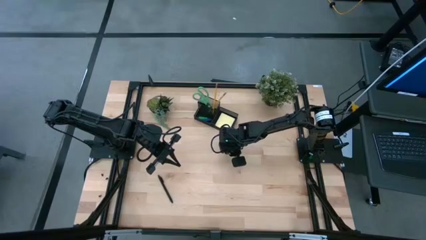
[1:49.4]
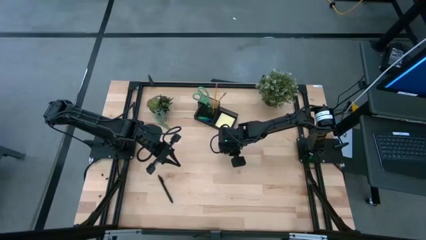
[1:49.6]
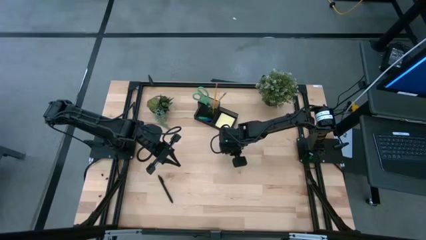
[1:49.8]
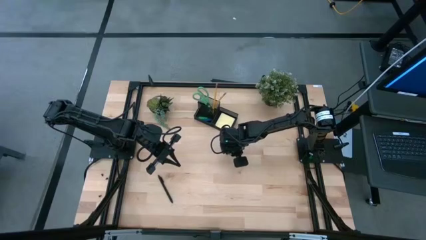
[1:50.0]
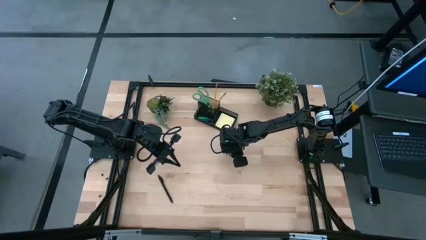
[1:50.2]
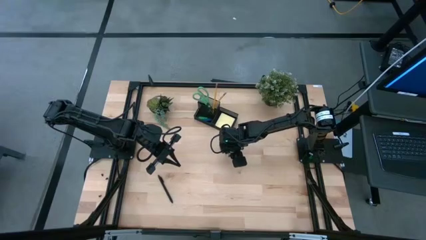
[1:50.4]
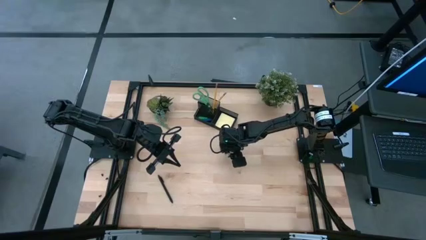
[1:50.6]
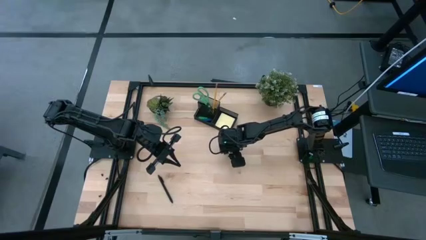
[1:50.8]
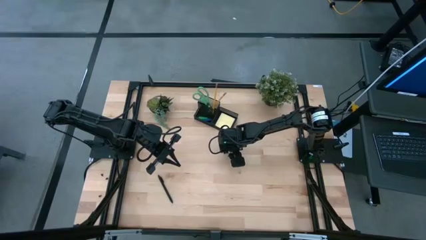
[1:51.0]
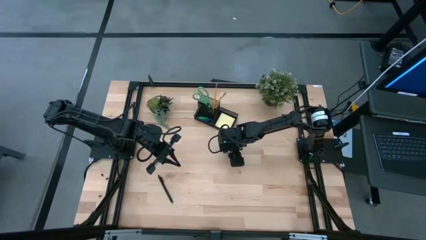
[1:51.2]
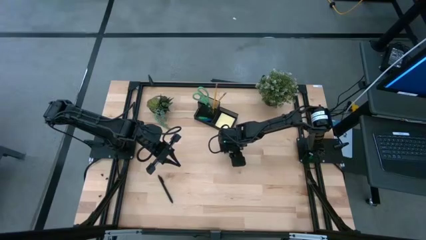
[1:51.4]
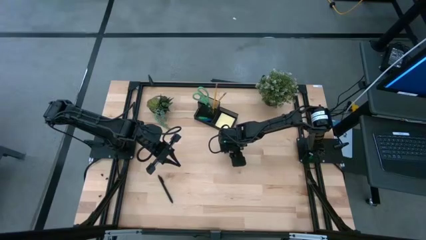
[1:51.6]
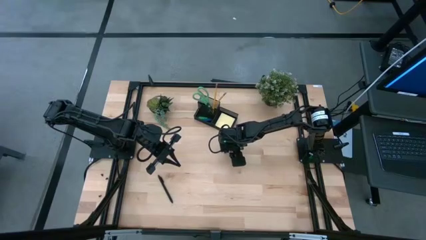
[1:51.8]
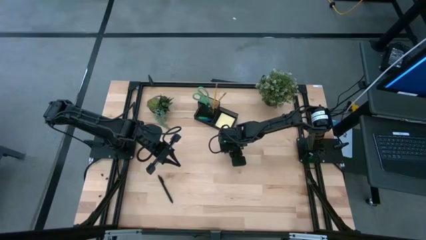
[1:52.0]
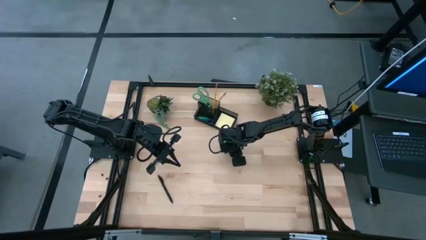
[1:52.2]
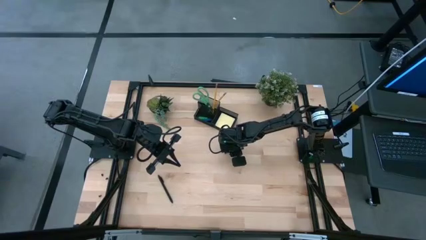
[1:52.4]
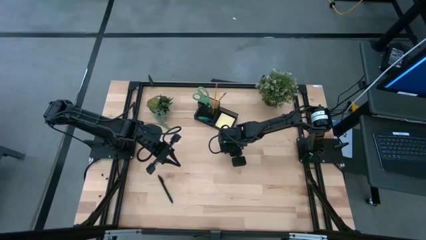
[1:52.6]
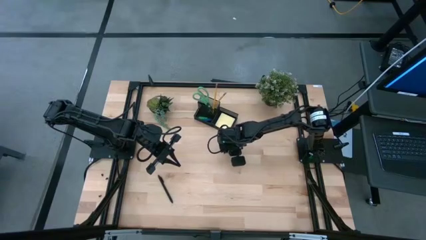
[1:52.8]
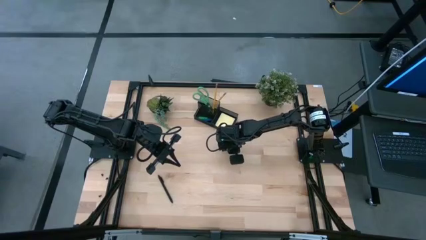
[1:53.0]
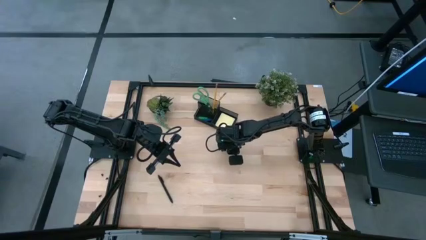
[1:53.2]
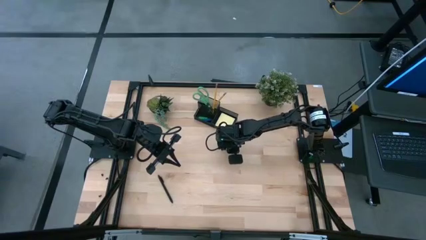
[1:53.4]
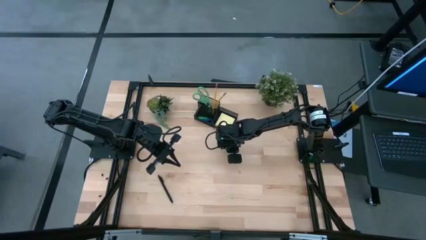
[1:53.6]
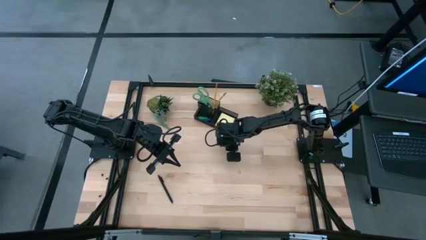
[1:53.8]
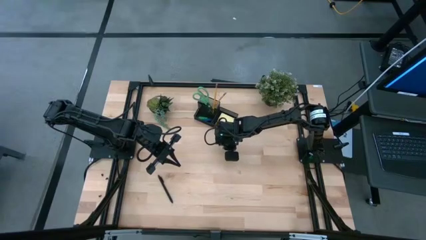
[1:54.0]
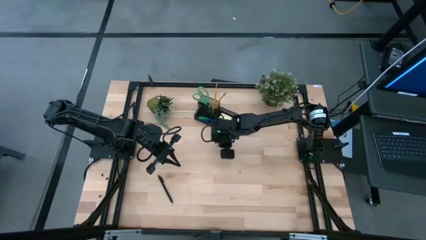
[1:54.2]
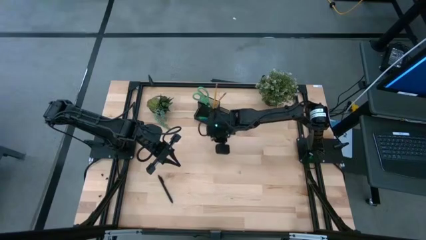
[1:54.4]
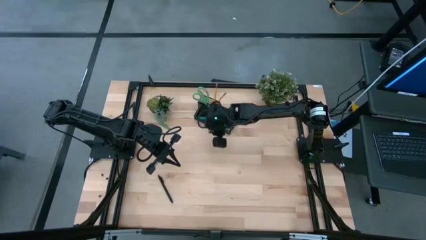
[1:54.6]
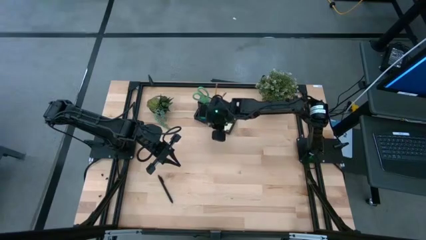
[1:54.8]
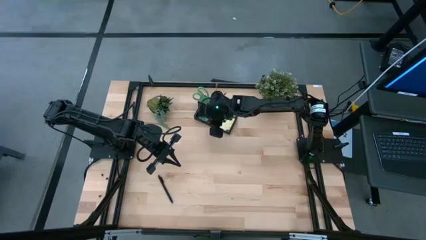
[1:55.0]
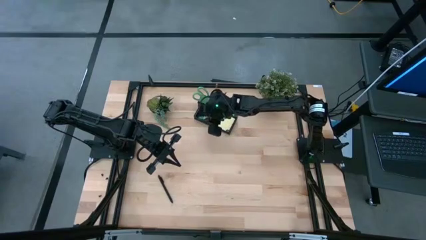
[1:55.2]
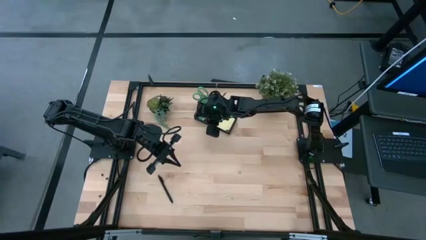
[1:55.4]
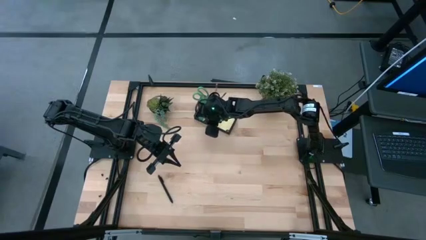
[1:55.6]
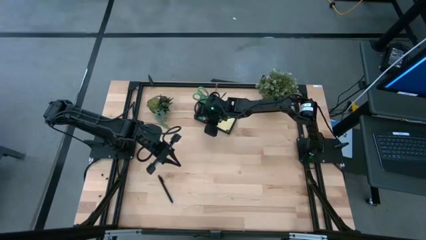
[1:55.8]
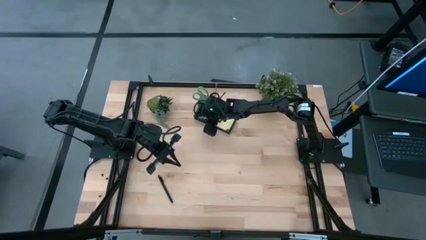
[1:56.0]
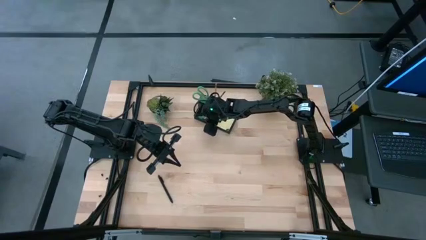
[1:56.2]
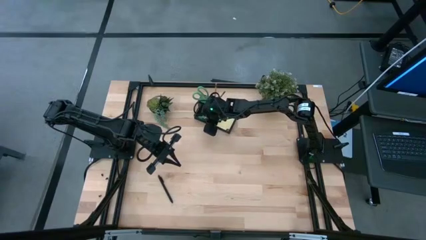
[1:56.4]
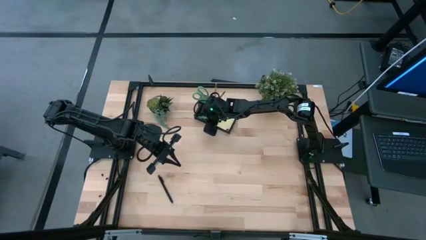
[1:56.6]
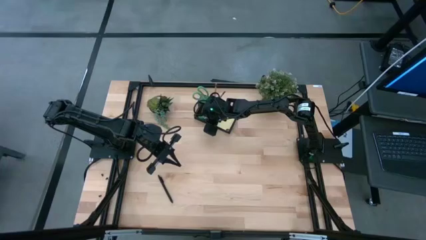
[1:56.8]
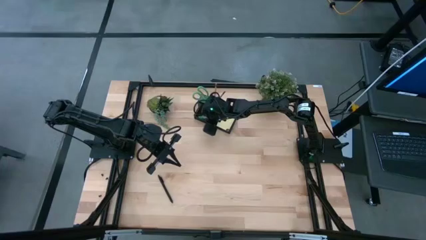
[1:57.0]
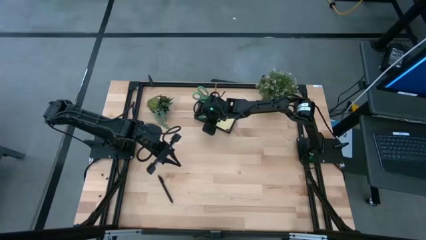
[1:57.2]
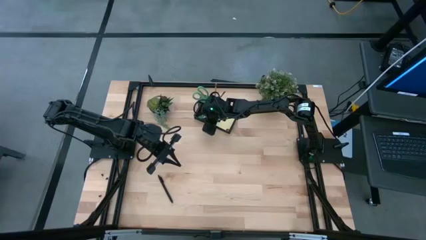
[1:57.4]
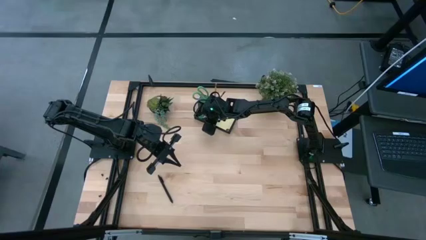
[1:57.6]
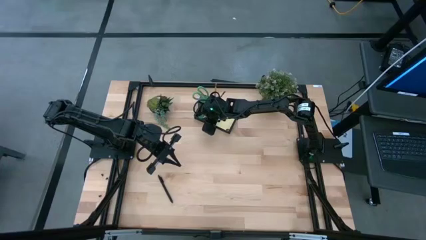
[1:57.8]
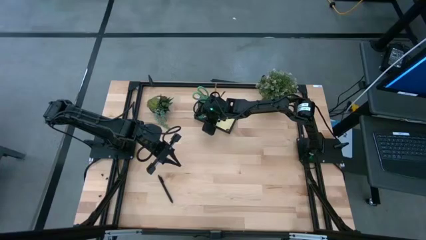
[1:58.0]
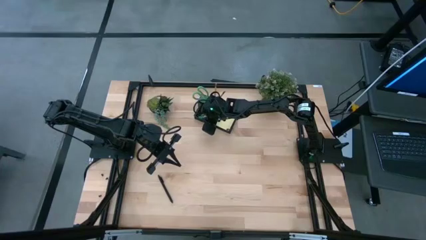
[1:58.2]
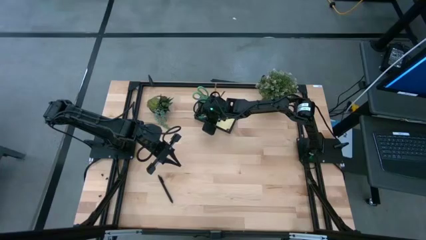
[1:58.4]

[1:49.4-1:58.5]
Task: Pick and place office supplies into organizer
Put the right binder clip into the desk organizer

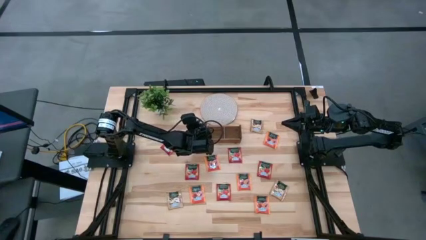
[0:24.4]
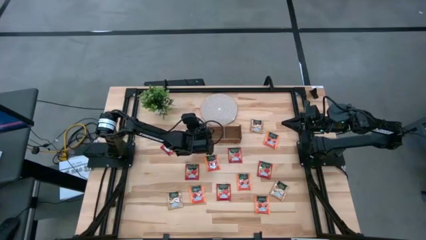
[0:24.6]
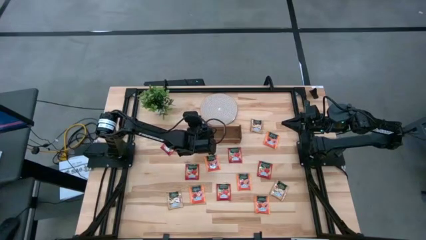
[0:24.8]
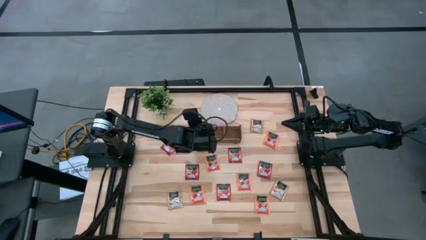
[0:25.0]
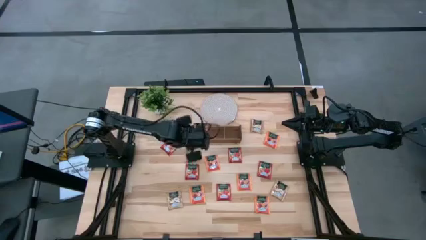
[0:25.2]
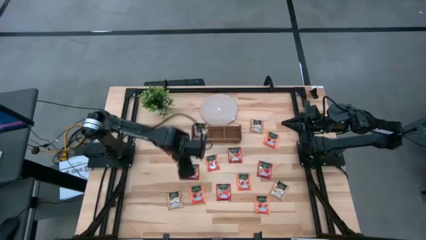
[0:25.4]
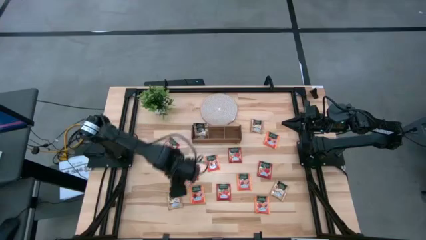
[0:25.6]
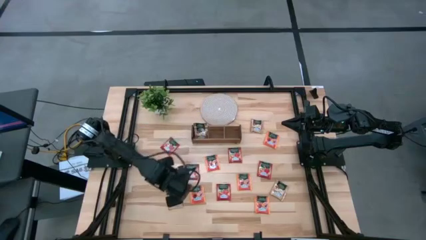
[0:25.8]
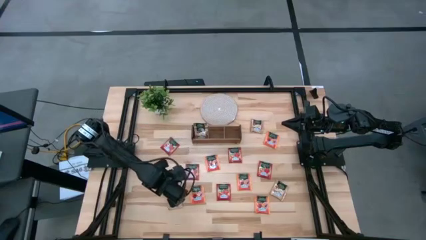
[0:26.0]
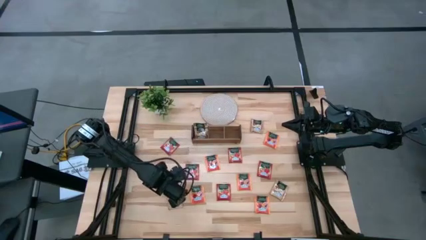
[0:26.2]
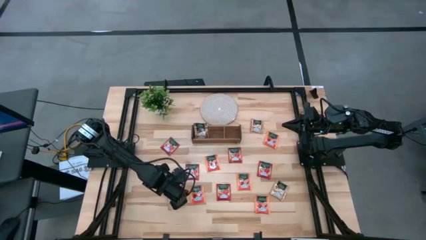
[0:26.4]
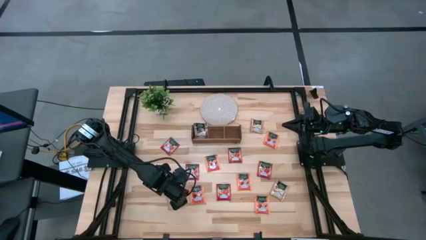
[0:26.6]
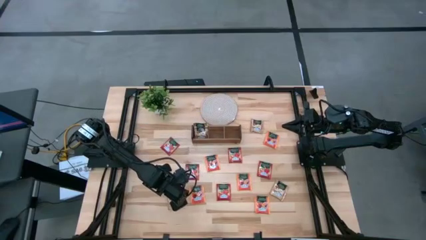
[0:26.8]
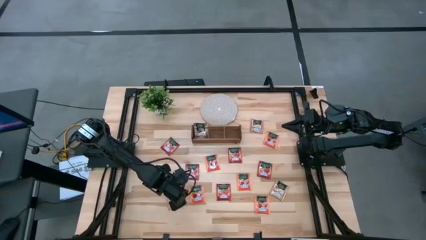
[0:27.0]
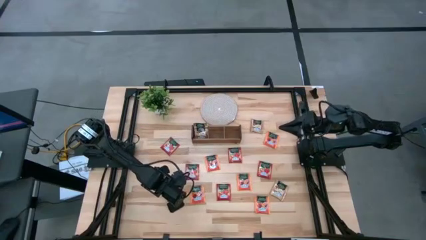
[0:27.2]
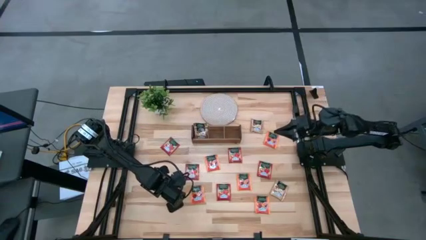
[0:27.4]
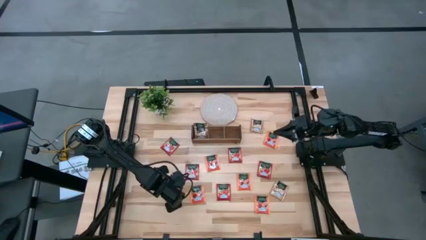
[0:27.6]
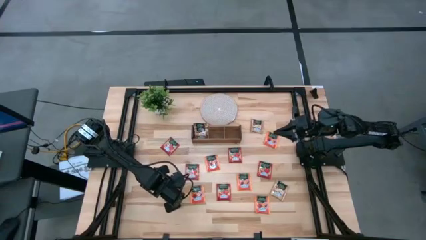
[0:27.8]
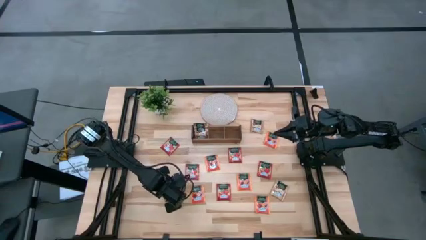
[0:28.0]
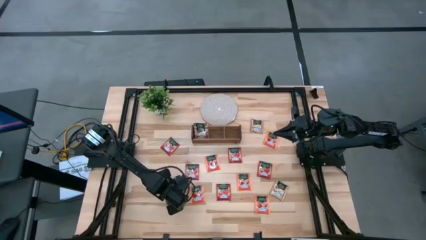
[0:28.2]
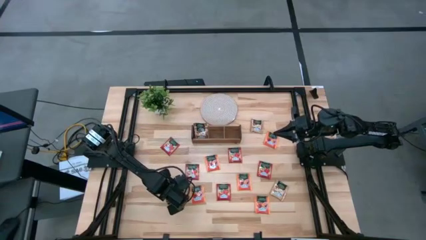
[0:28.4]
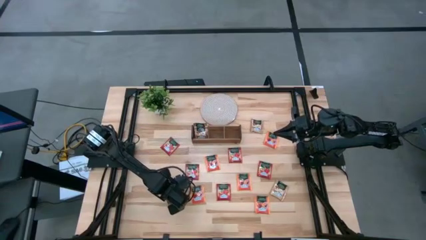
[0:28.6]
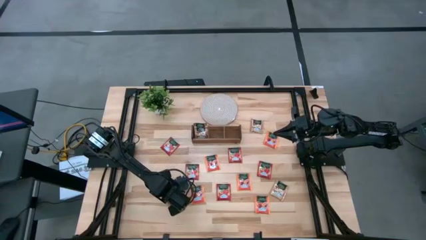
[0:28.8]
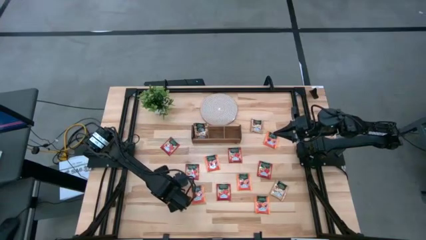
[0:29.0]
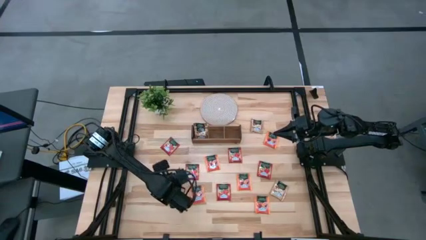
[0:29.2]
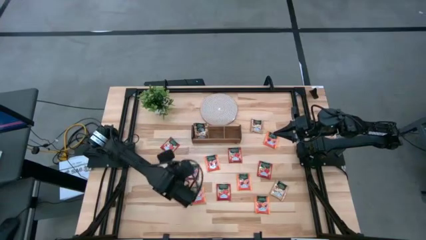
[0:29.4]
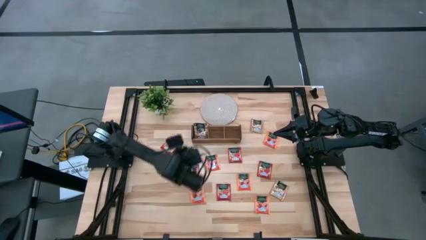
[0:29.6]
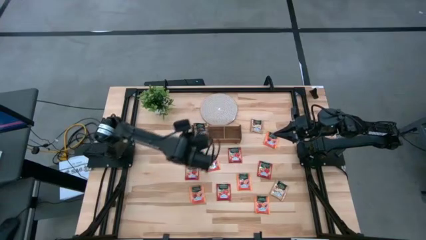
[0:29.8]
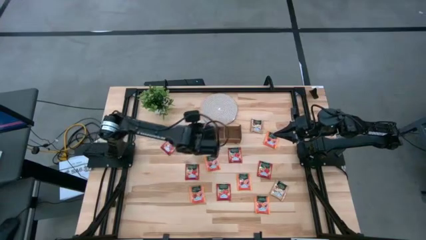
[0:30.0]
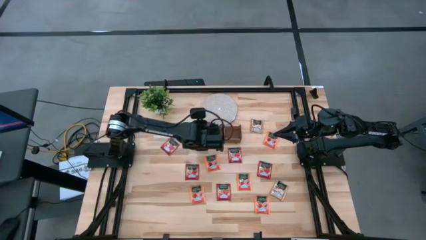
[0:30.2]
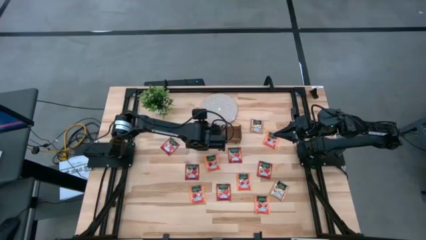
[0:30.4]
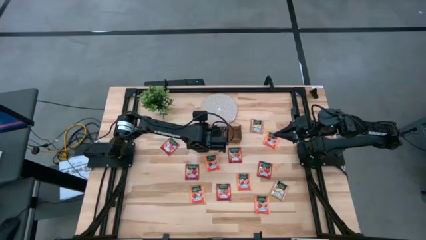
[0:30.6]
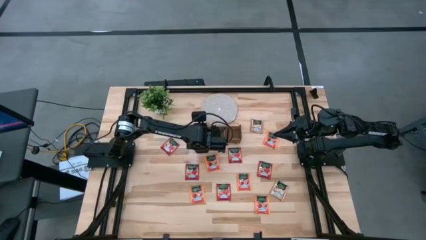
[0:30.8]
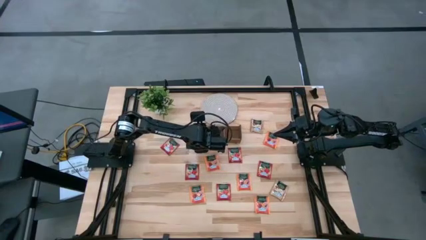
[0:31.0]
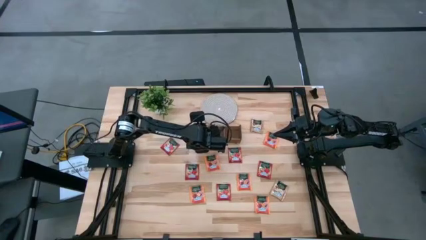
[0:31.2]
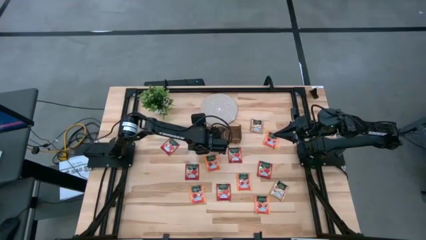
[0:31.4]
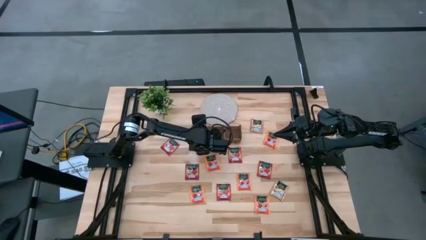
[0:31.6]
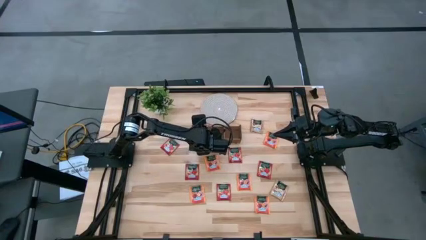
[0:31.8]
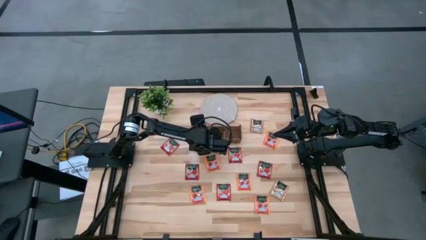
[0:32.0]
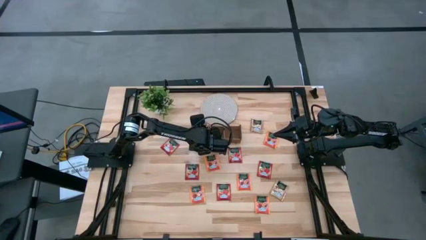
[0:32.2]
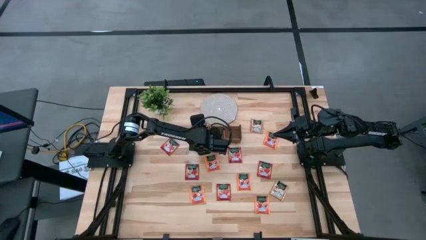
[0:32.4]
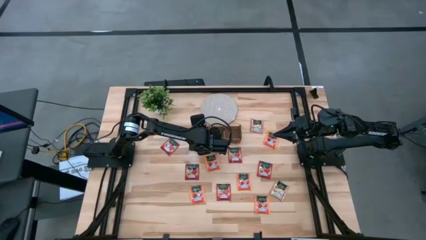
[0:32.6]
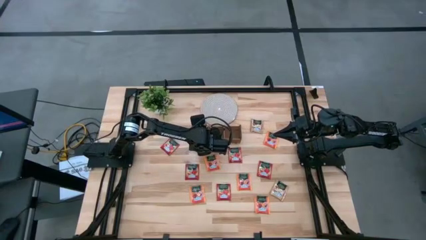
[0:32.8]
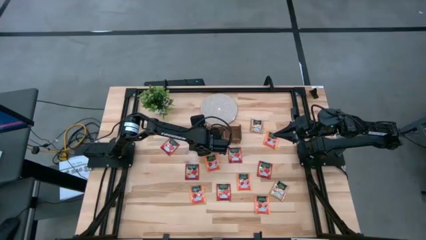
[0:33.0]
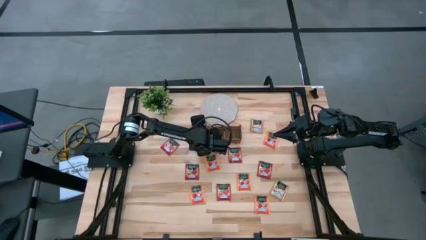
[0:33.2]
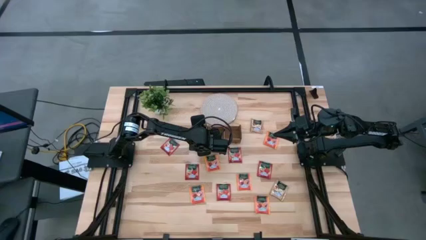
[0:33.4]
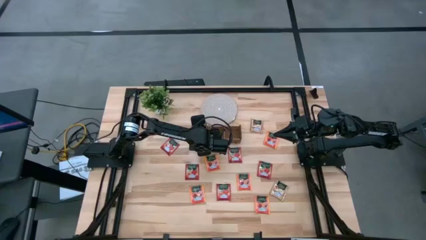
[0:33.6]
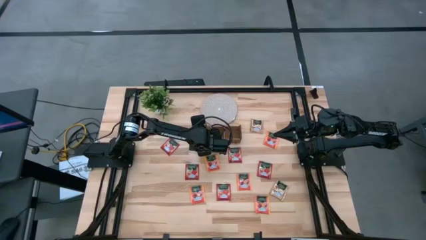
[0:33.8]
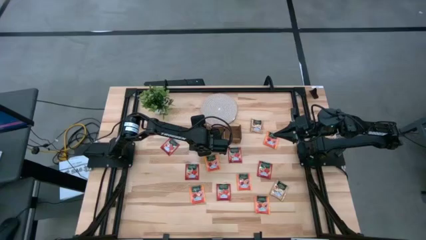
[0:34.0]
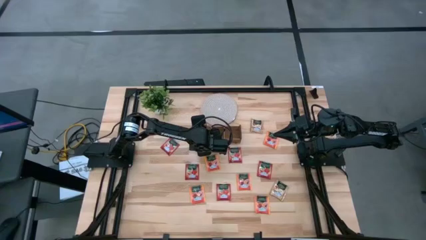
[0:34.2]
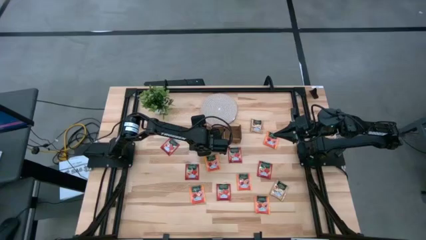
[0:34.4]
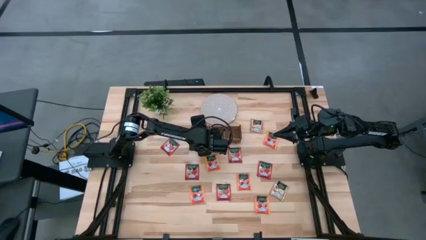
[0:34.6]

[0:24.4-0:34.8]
Task: Pick & Place Tea
Put the brown tea bag into the left of the wooden organizer
